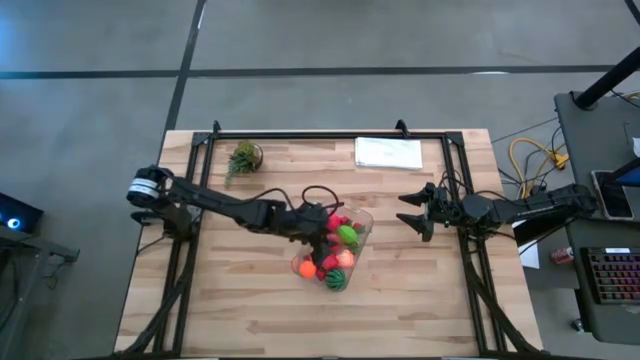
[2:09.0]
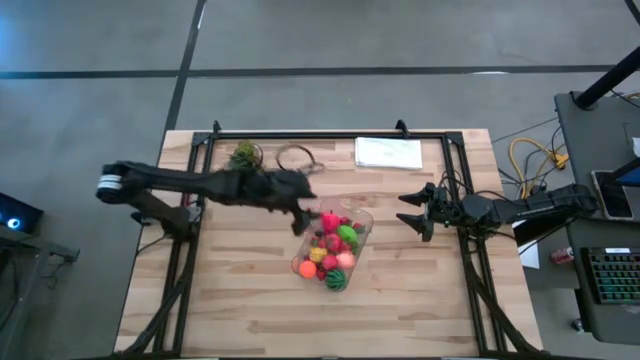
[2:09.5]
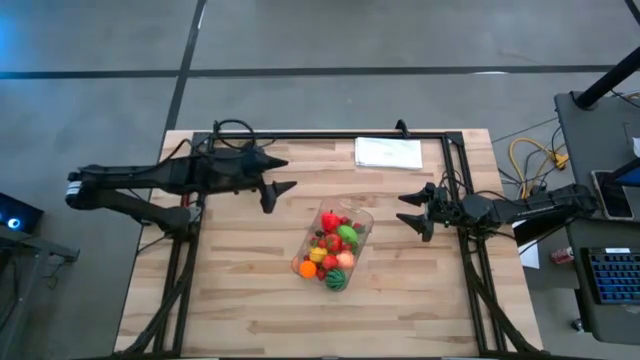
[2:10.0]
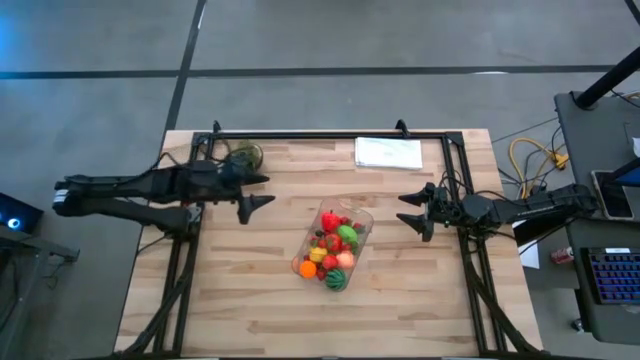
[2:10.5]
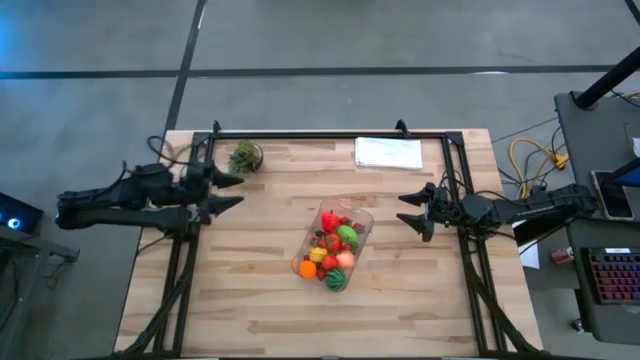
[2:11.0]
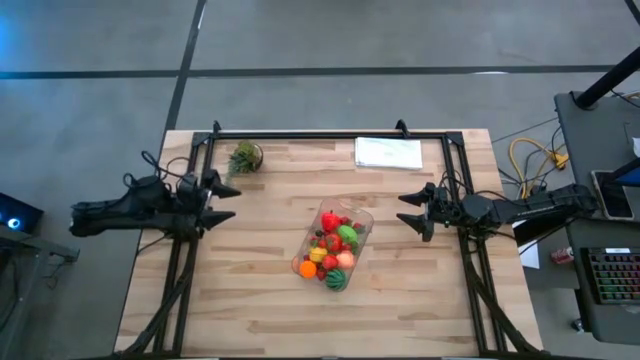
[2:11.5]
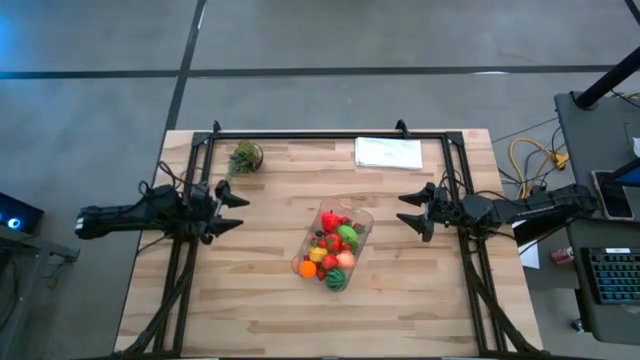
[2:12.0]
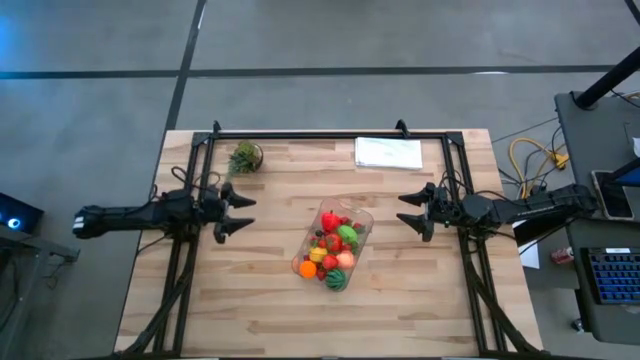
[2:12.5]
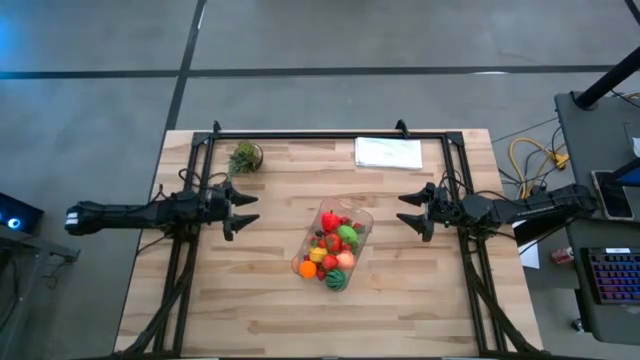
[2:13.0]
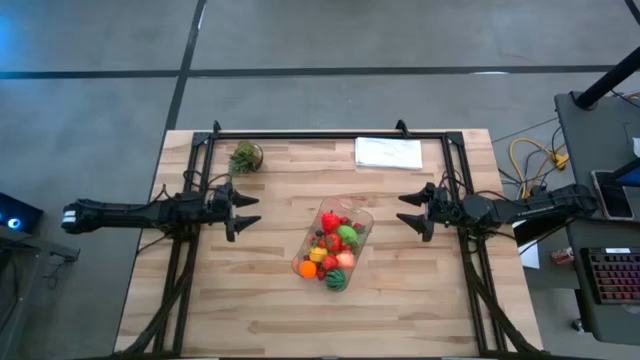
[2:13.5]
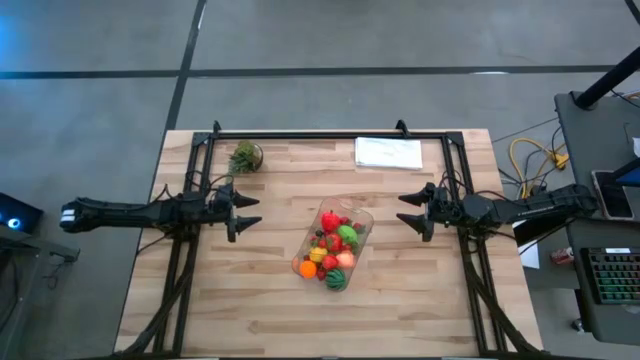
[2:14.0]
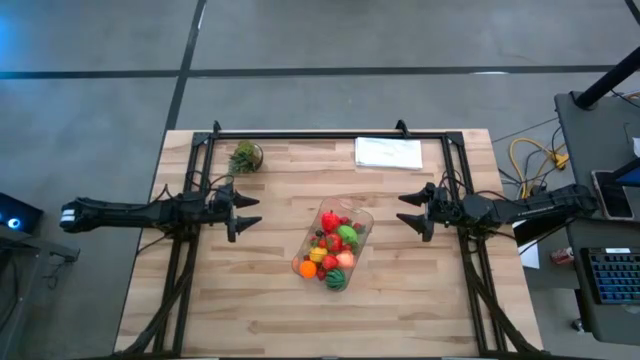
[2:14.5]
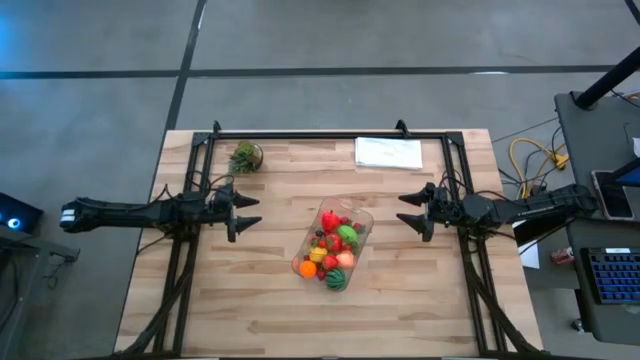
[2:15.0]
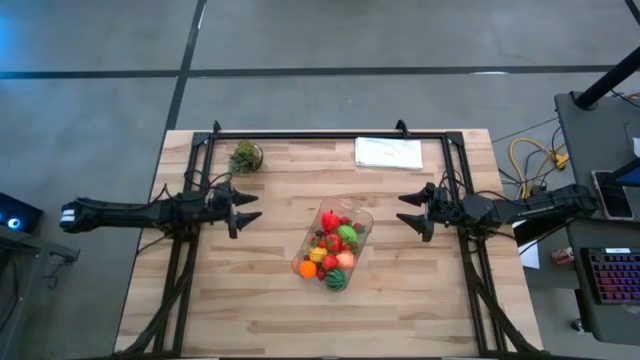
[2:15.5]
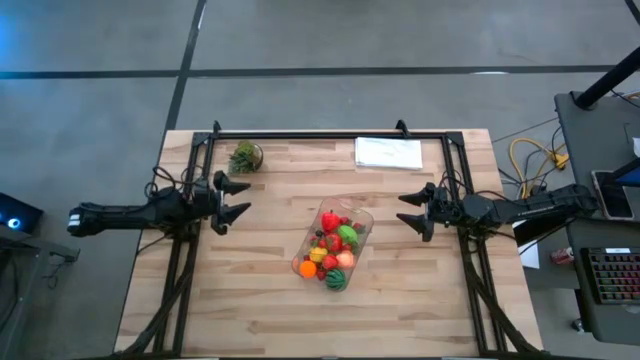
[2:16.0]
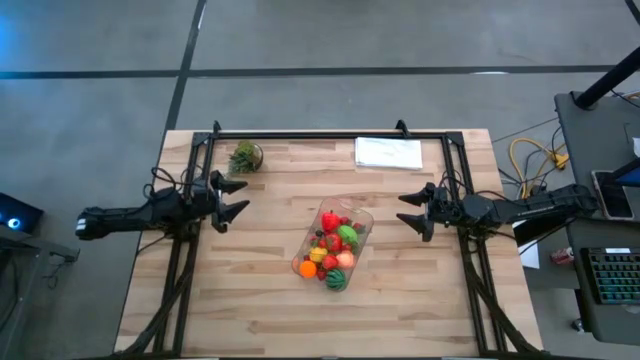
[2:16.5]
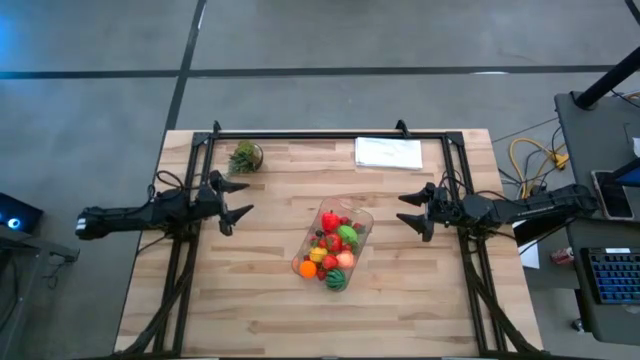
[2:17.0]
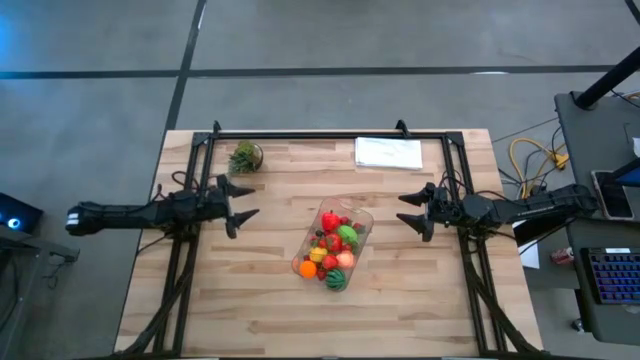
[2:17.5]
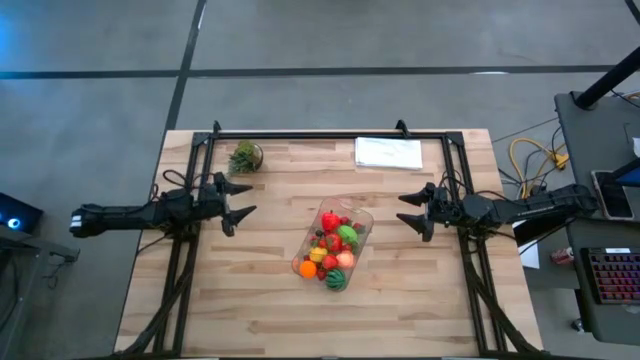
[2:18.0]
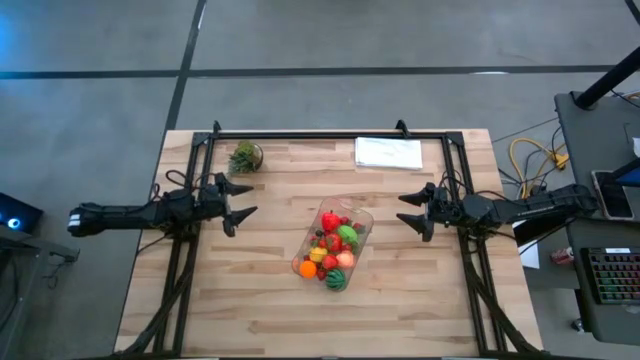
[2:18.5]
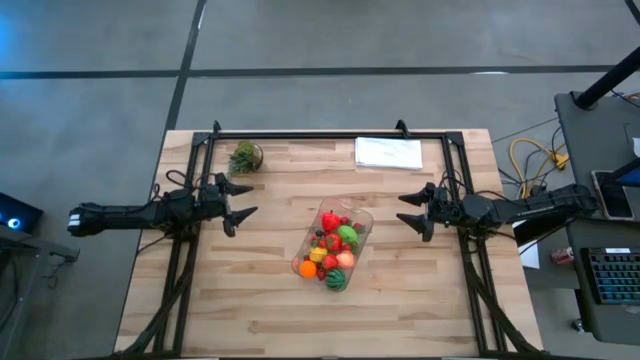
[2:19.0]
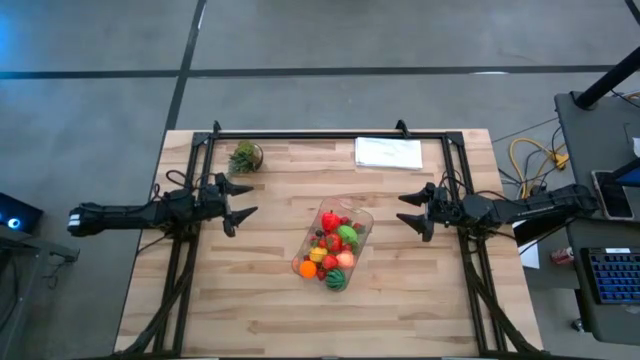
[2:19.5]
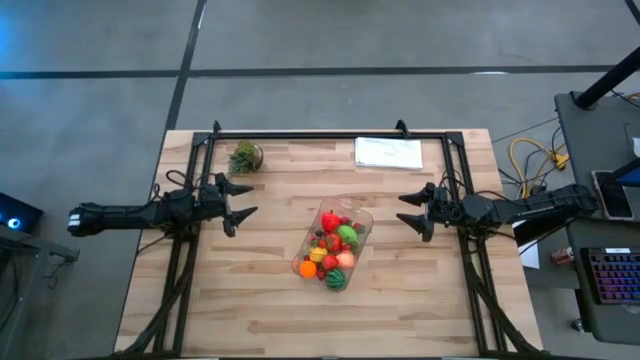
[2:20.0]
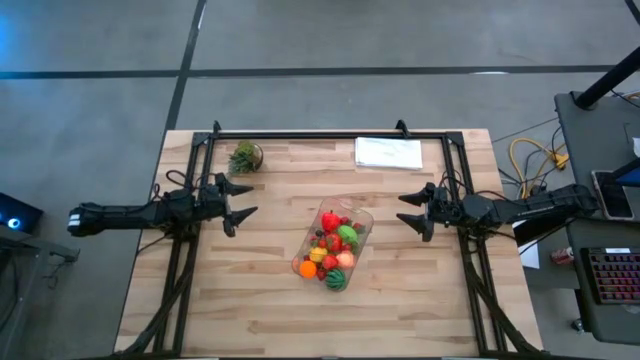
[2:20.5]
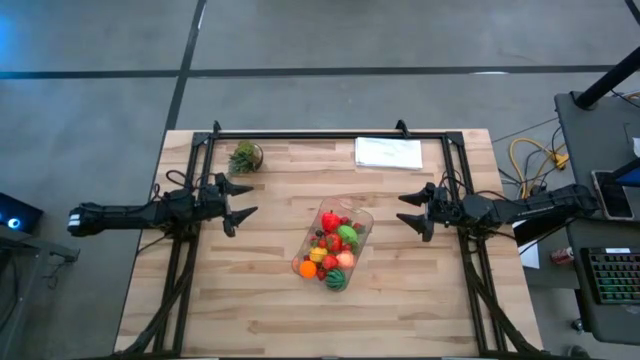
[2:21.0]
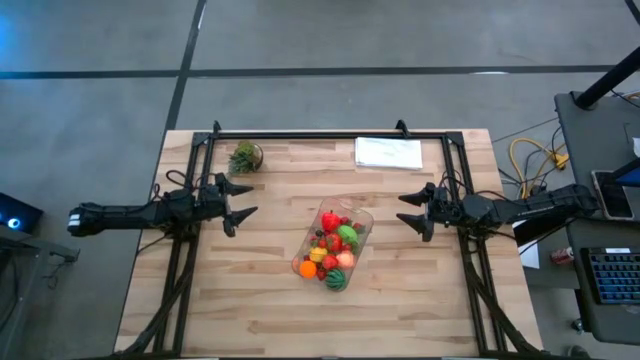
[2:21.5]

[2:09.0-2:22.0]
Task: Pick and placing Produce into tupperware
Return to Home Position

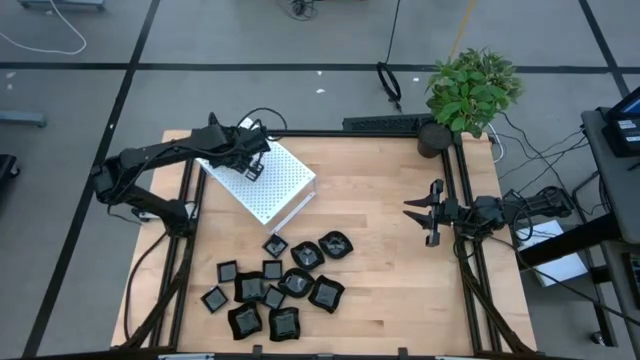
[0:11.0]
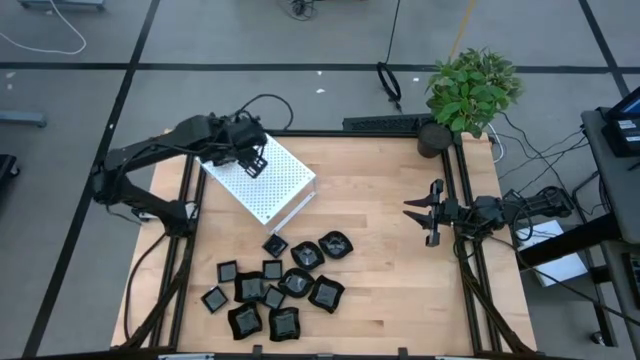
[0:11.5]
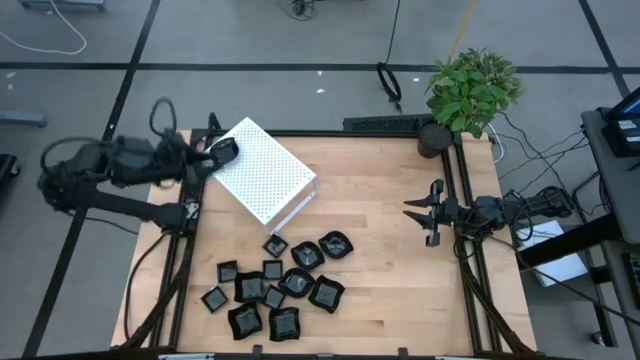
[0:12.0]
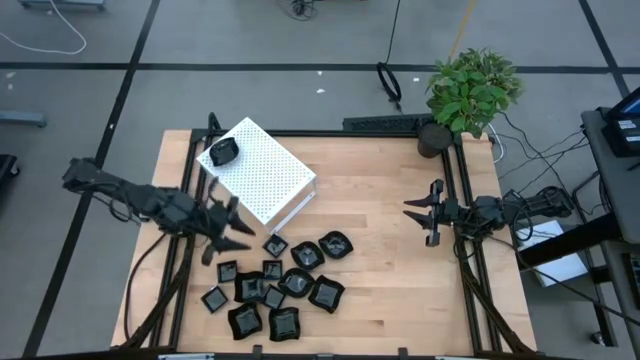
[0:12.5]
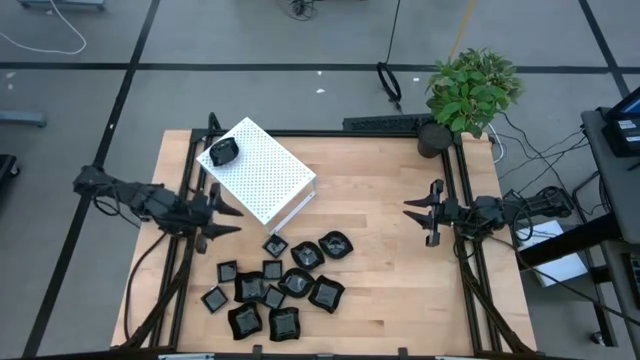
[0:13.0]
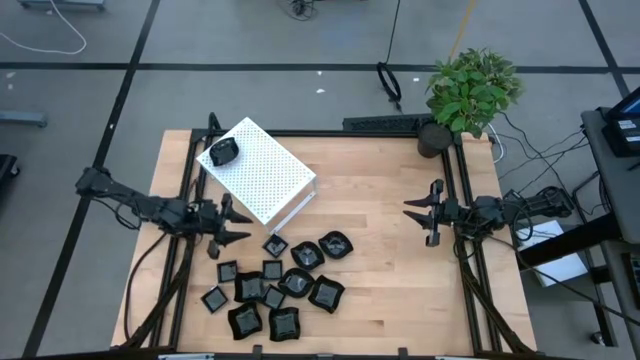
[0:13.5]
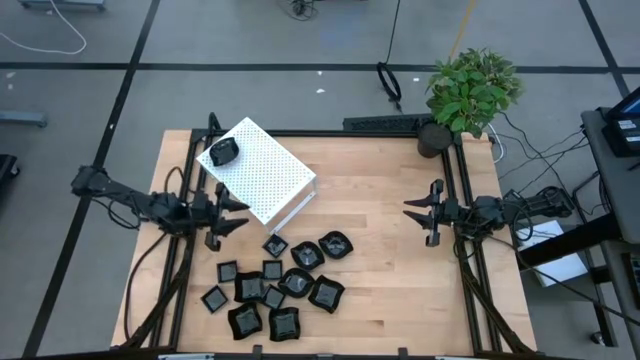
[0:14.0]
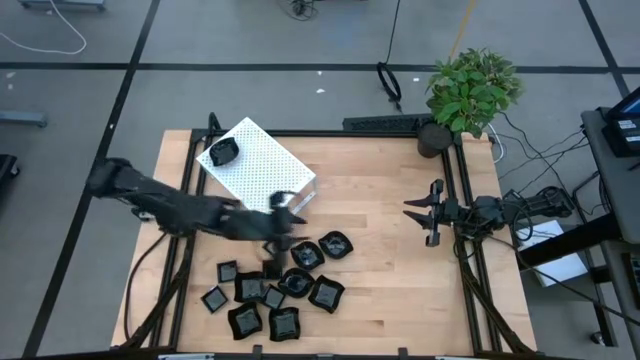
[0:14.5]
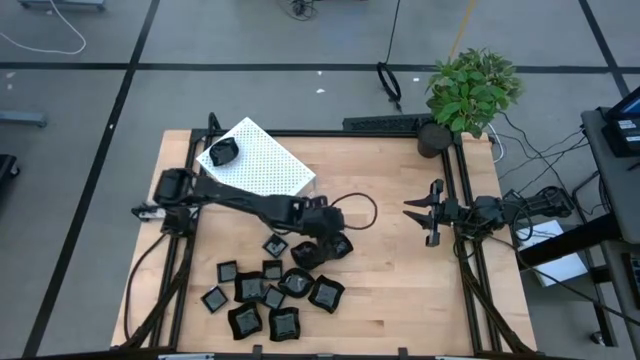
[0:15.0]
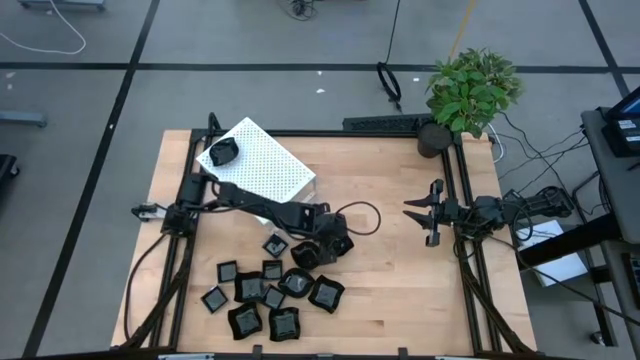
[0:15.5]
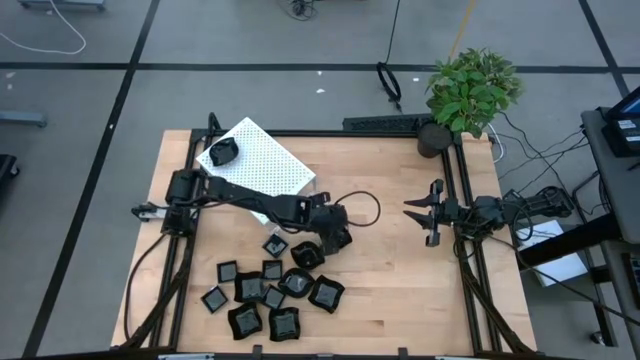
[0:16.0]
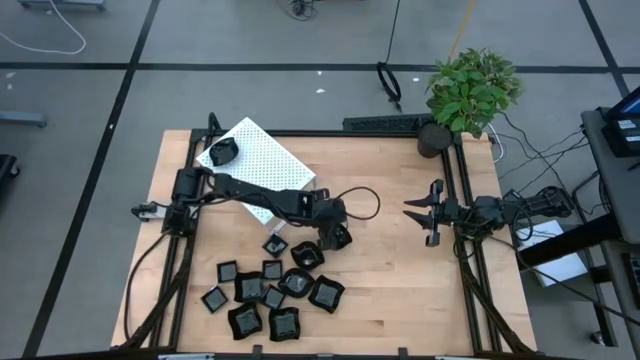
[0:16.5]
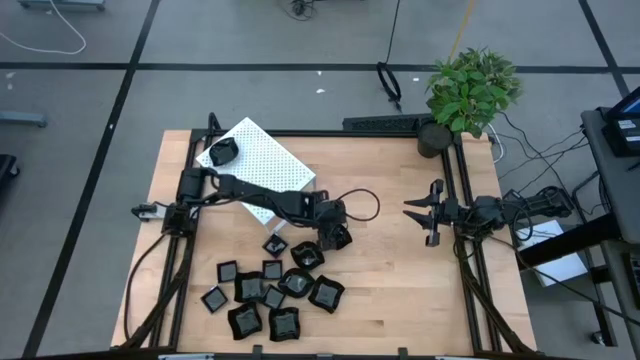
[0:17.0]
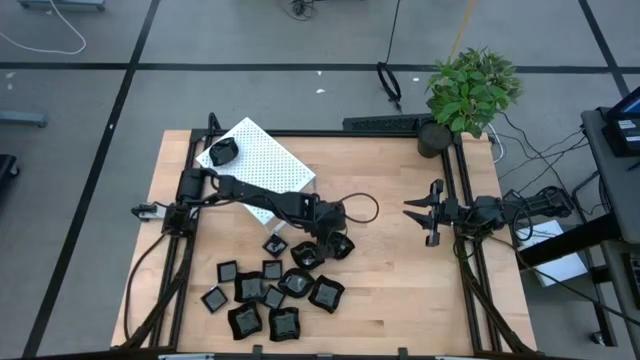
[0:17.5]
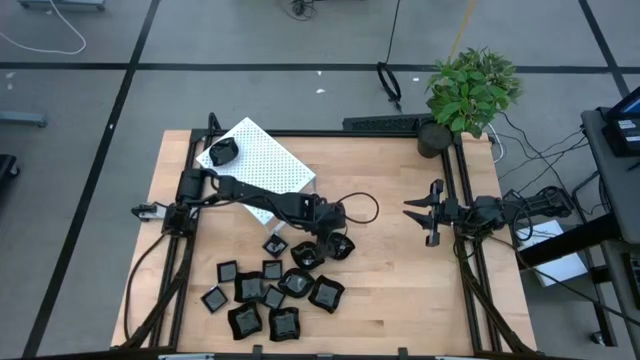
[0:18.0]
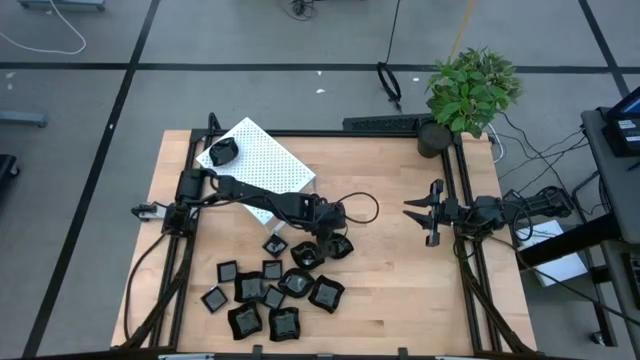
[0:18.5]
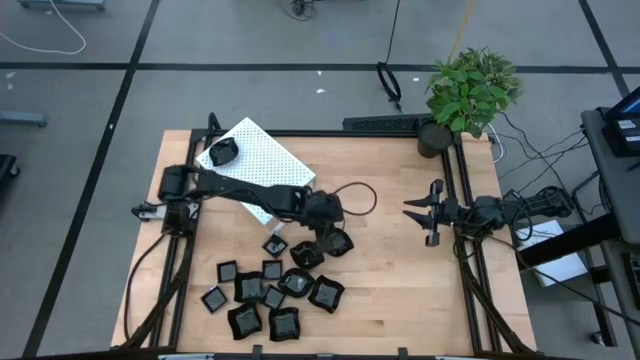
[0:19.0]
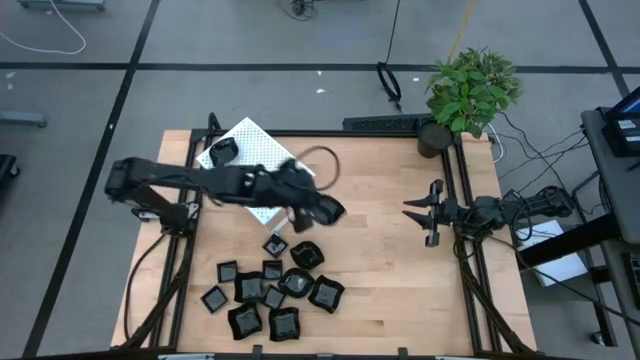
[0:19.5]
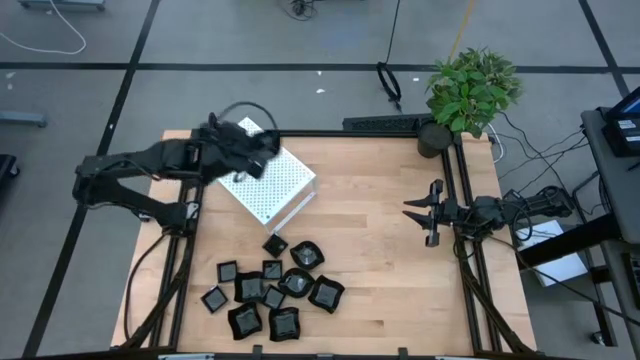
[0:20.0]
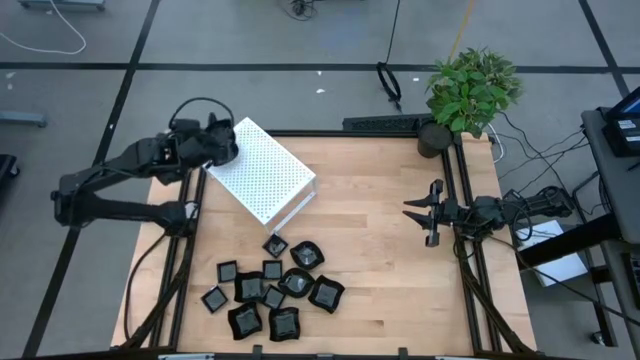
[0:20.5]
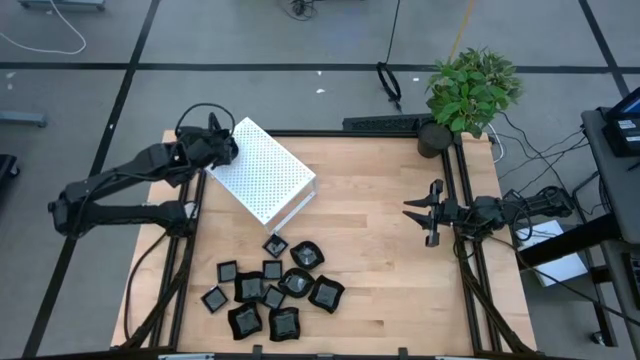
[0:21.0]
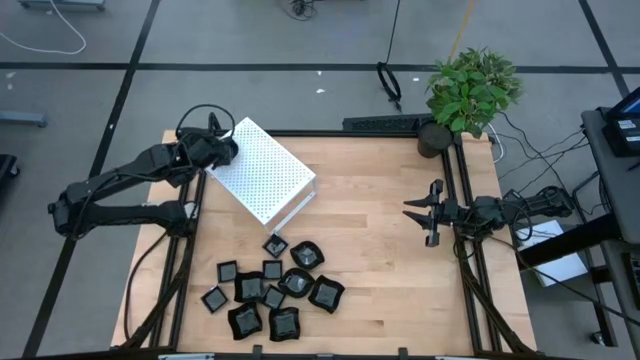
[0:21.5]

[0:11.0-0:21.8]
Task: Pick & Place Mini shaped plates
Stack the black leaf-shaped plate on top of the black leaf-shaped plate on the shelf
